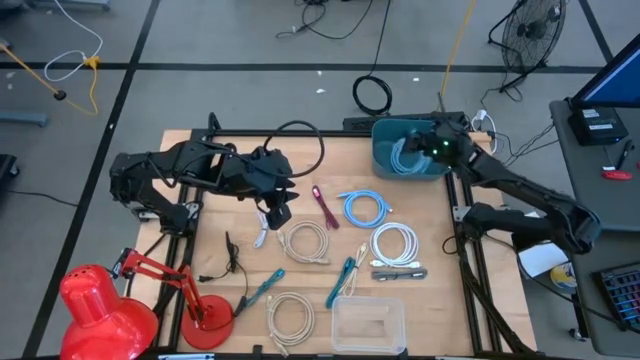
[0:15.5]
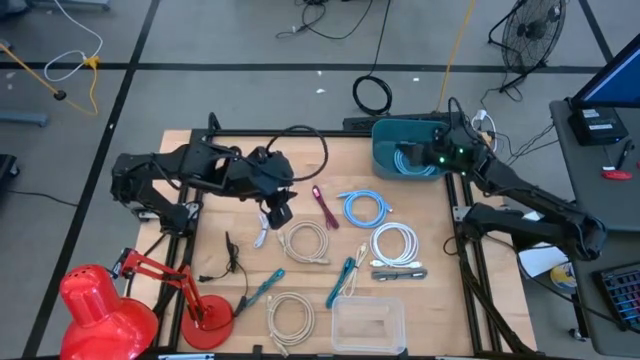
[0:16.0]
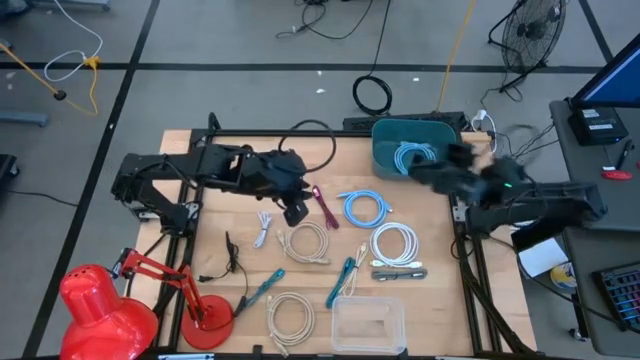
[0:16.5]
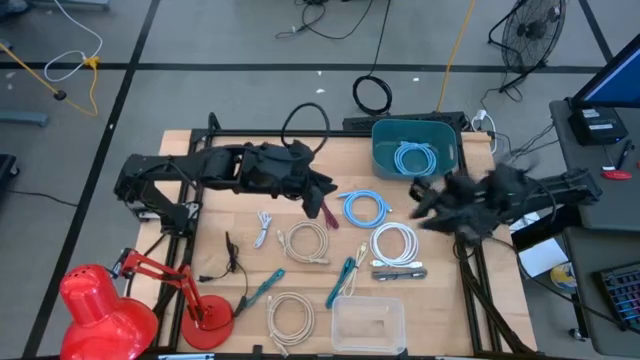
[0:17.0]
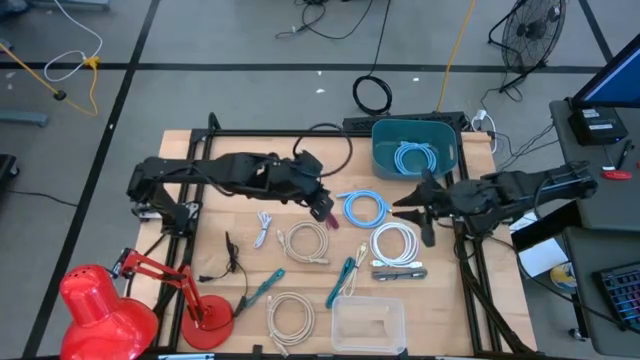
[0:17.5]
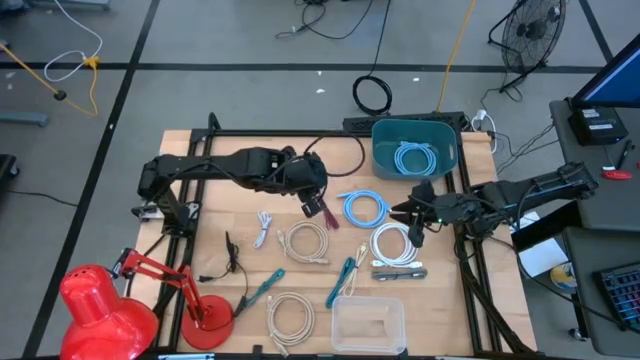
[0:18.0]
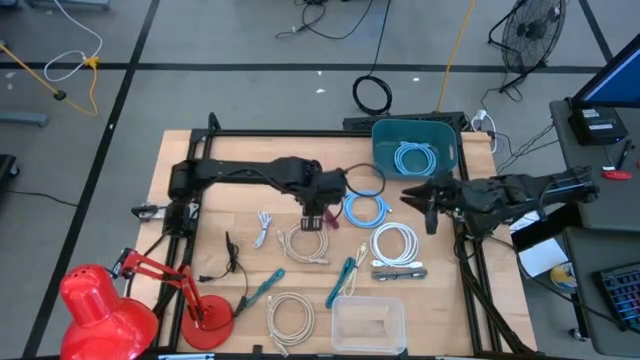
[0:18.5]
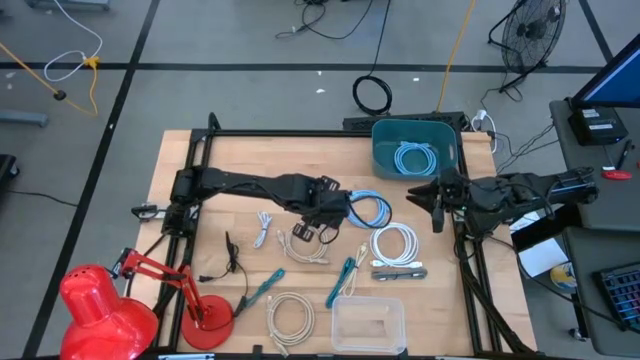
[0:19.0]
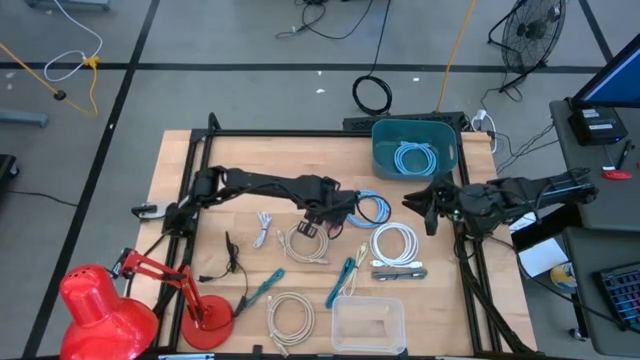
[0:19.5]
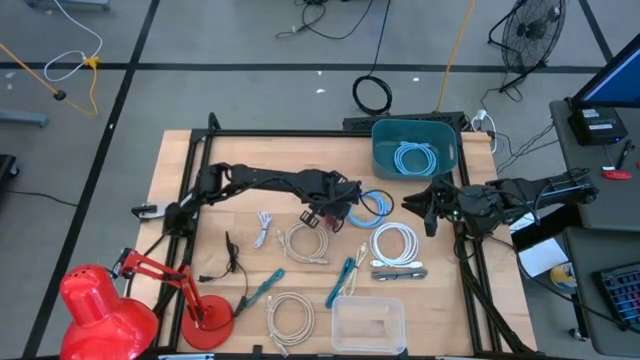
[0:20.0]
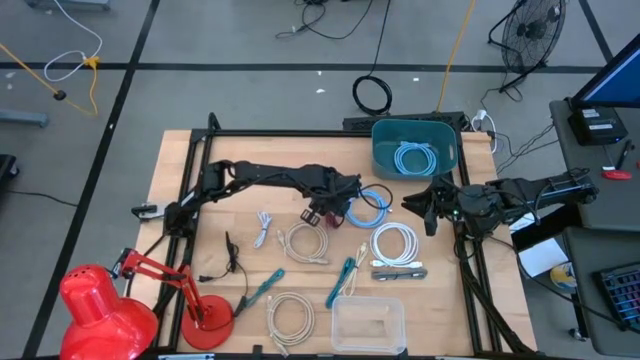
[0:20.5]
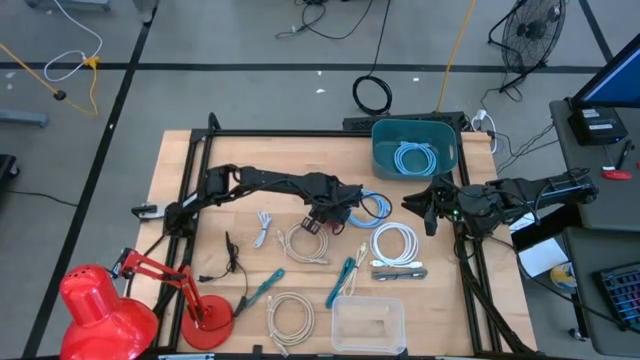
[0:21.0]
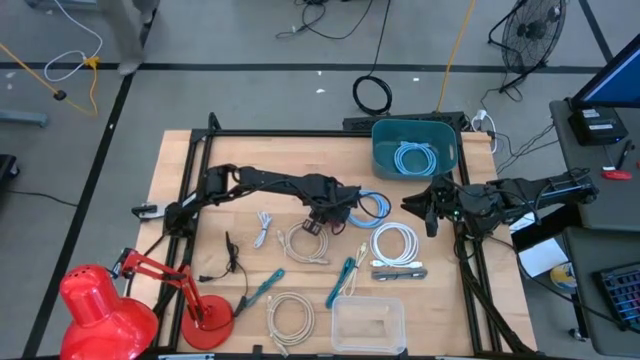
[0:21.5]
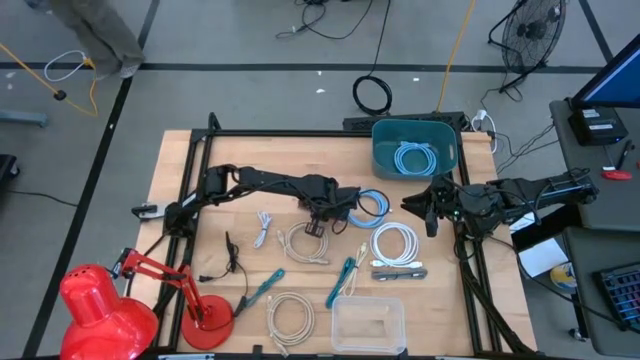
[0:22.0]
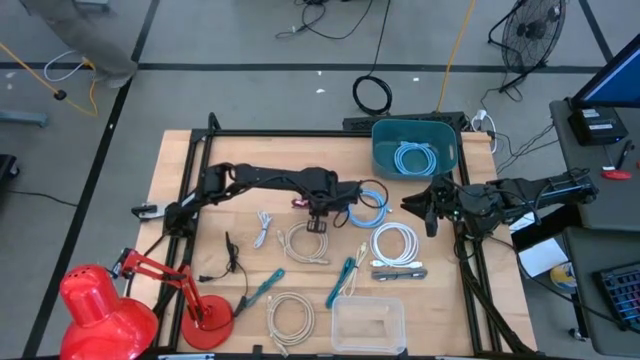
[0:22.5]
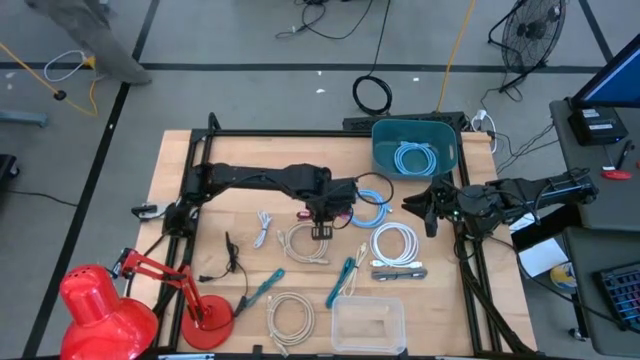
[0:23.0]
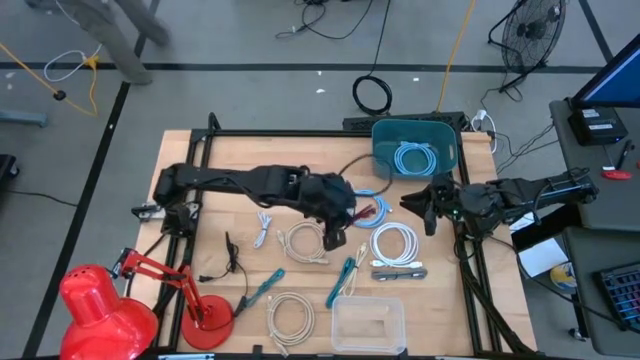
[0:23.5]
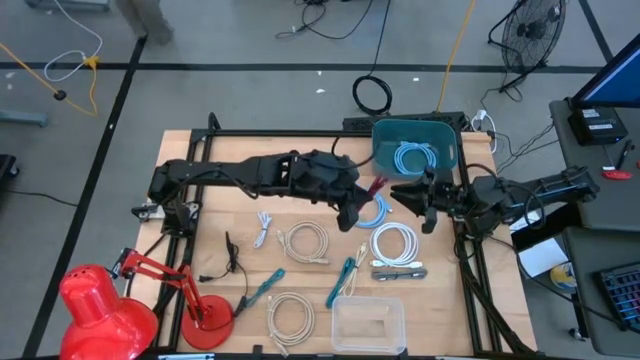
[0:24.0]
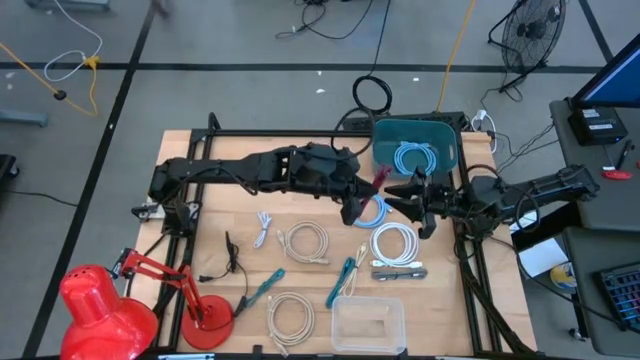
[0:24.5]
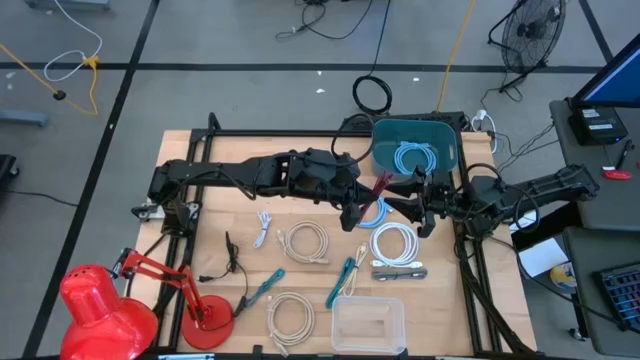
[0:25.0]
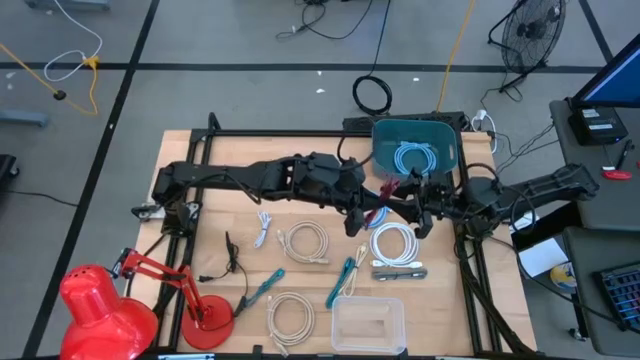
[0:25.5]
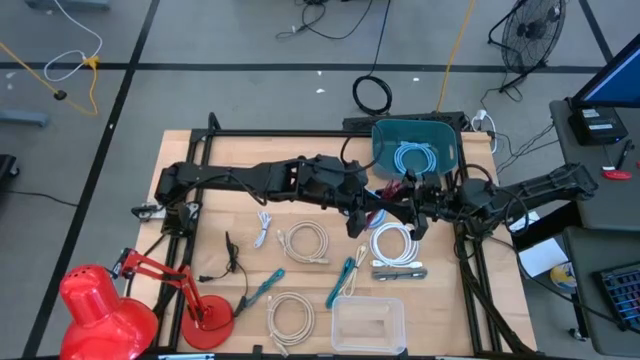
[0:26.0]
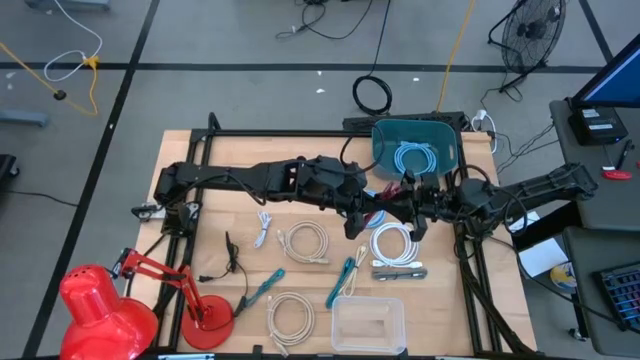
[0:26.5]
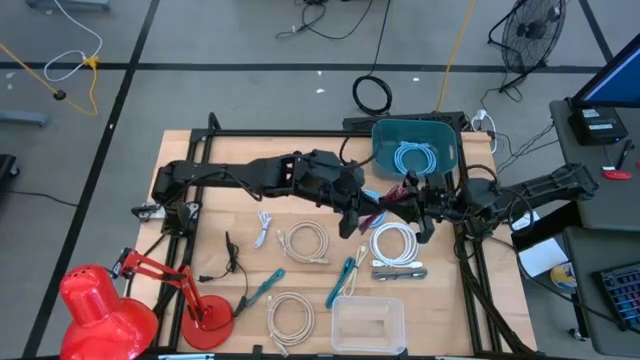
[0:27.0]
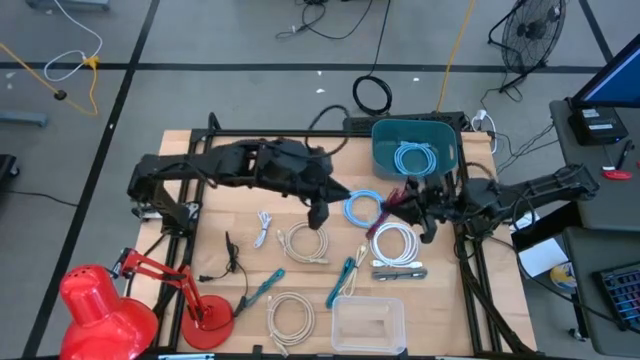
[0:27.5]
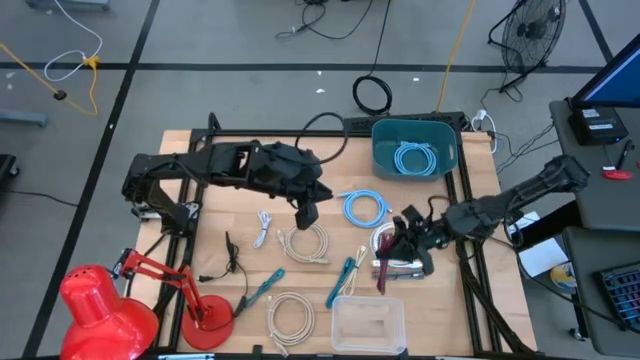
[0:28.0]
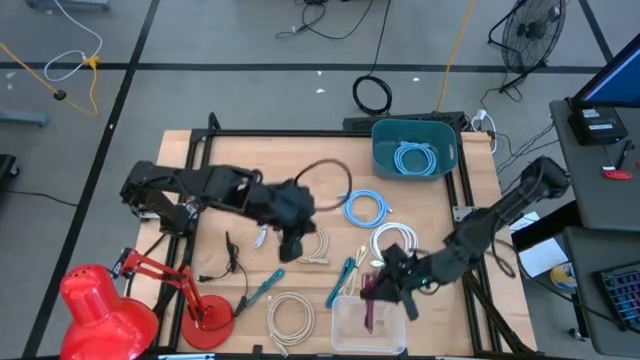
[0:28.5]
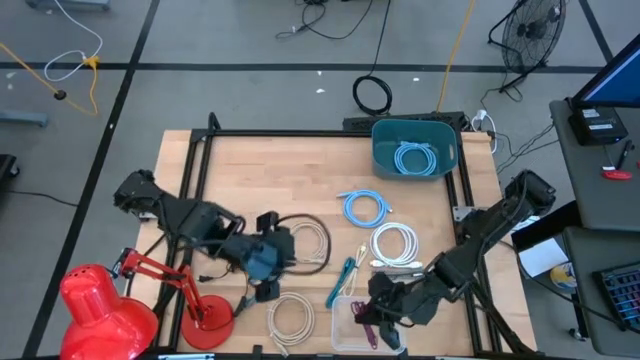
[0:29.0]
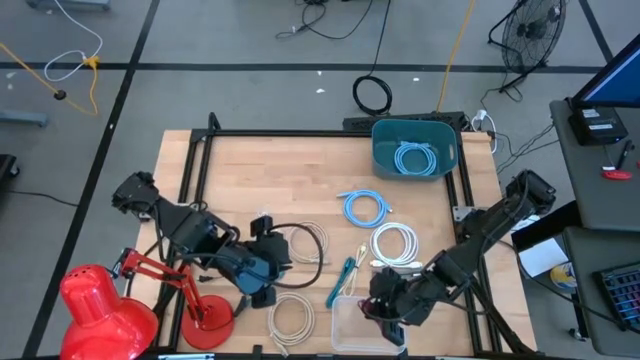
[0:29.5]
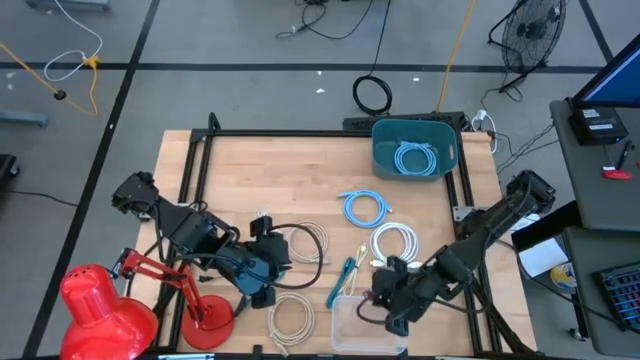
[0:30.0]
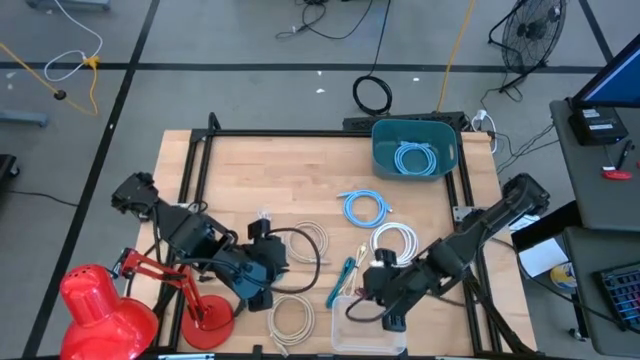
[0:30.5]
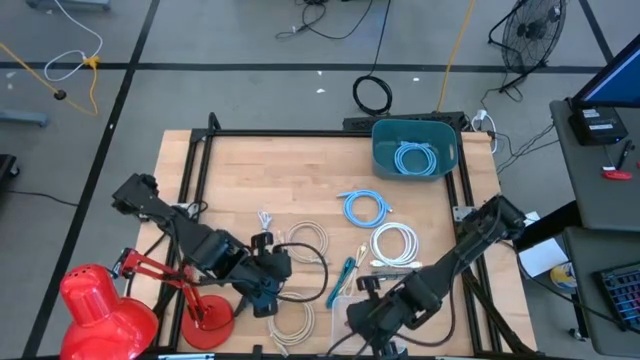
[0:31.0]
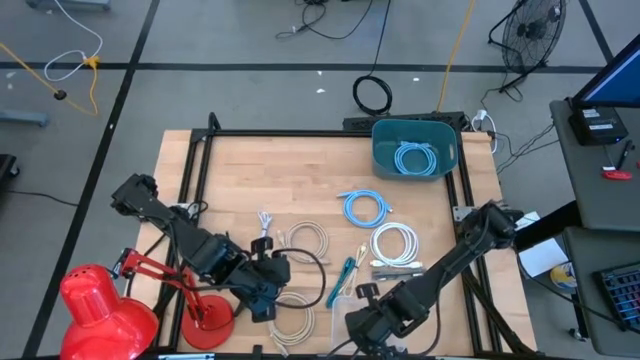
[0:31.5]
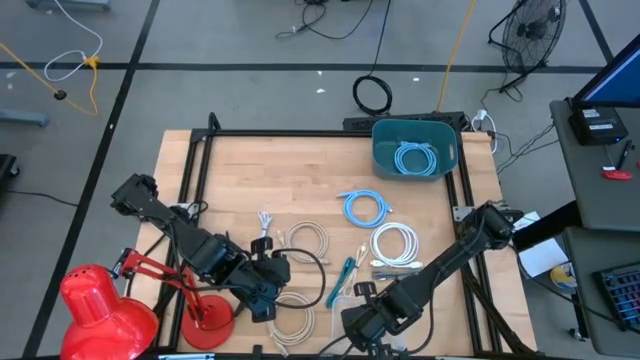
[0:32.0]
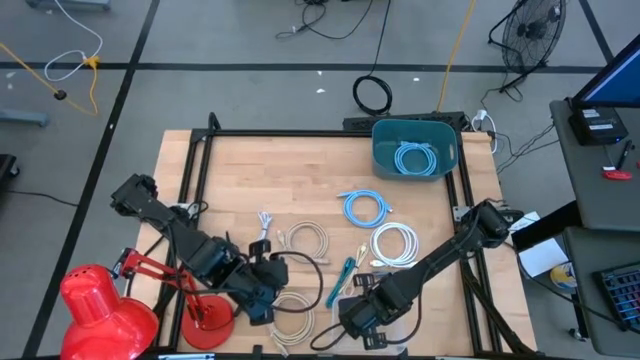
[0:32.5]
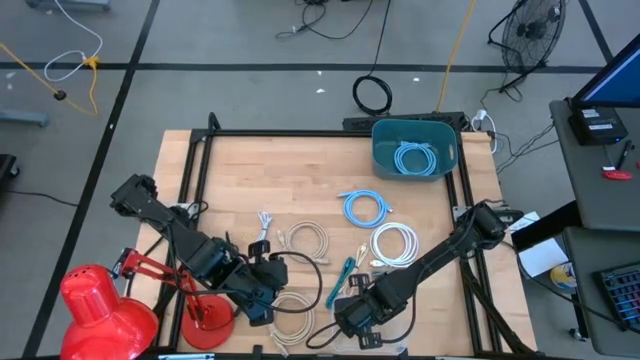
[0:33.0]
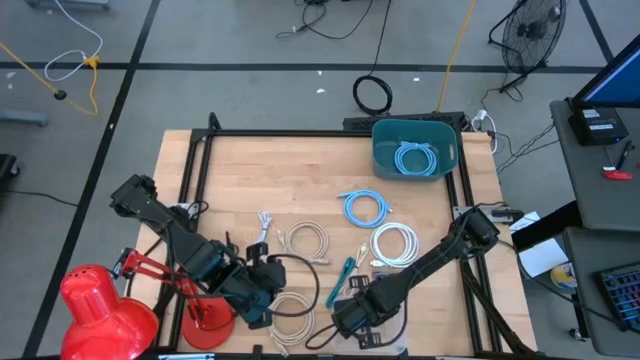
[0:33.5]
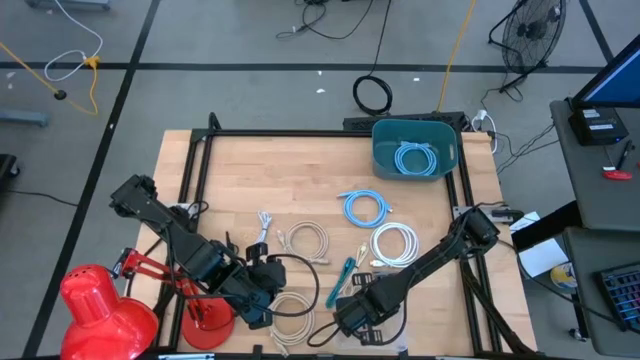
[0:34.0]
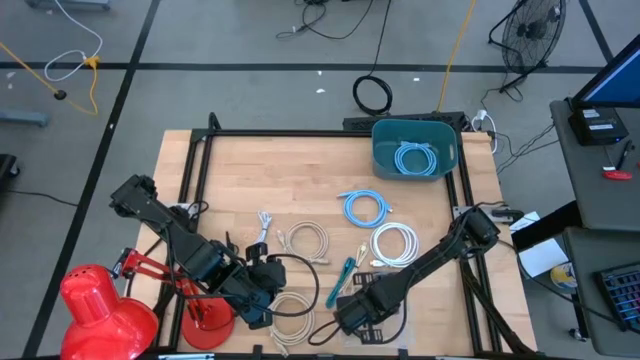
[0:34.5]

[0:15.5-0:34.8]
Task: Pick & Place USB Port
Put the pink charger cable into the transparent bin

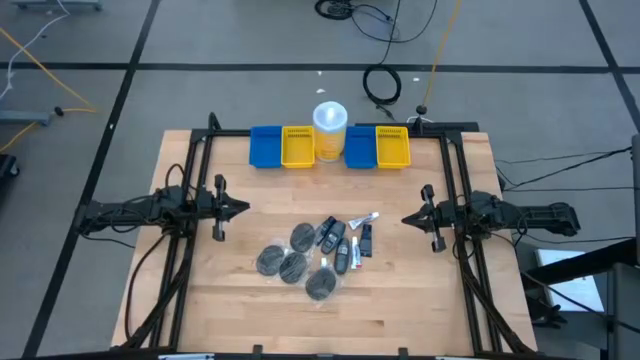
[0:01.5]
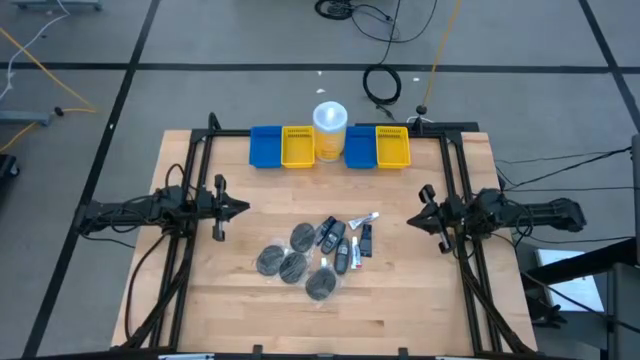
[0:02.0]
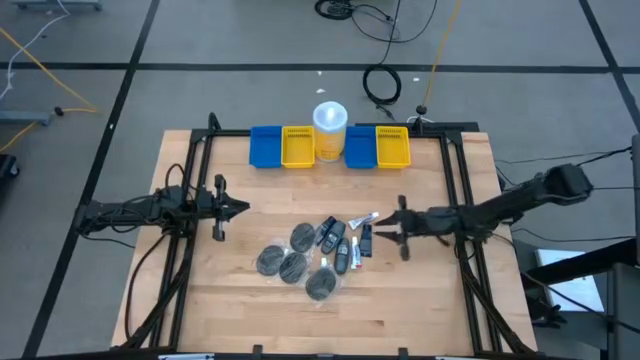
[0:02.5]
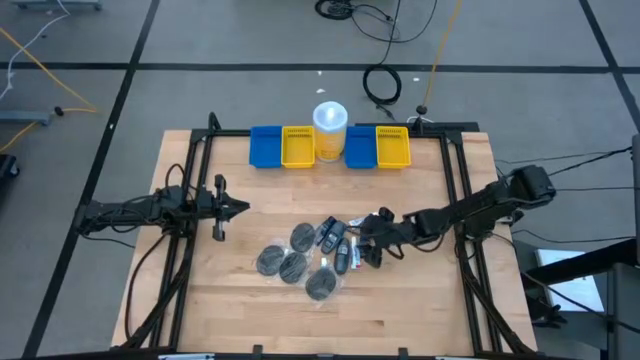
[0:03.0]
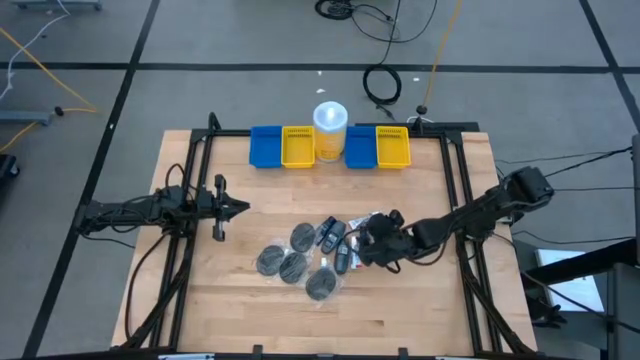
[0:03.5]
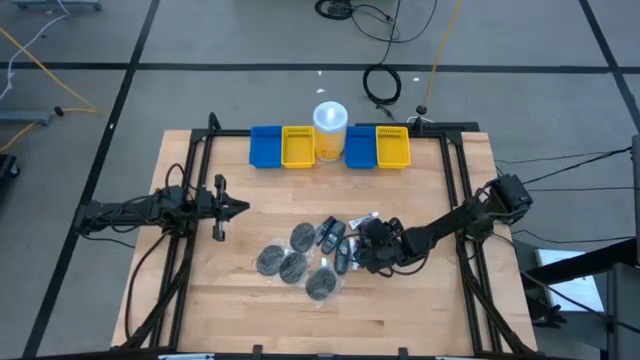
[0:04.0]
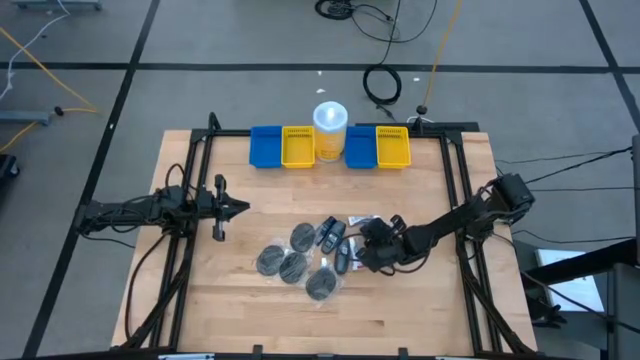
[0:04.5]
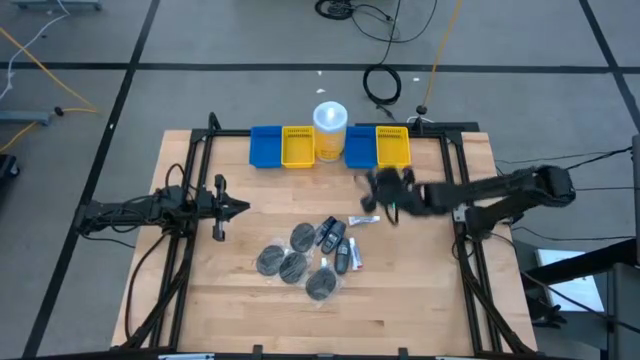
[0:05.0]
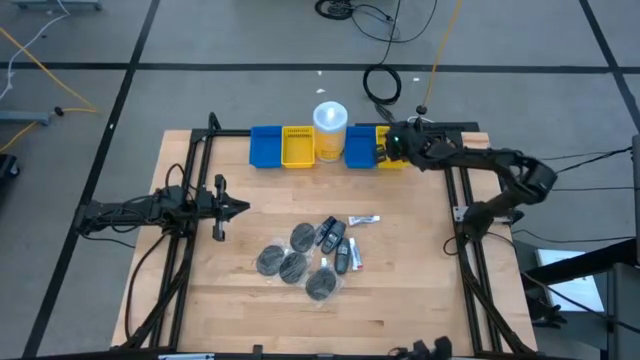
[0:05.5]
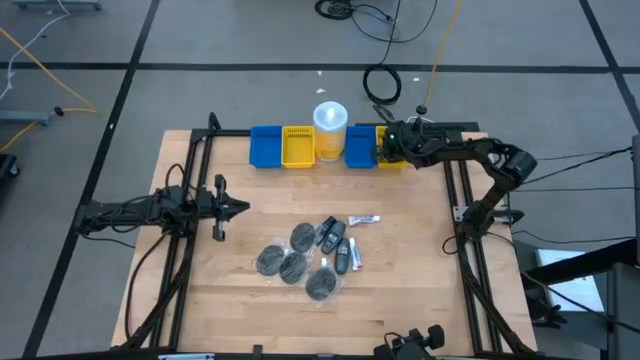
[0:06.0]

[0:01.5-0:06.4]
Task: Pick & Place Travel size toiletries
Put the dark blue shave cream into the right yellow bin
